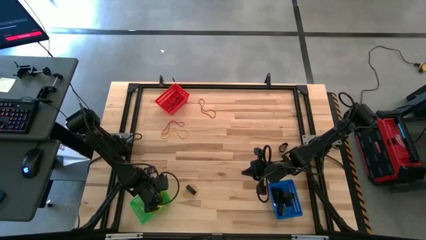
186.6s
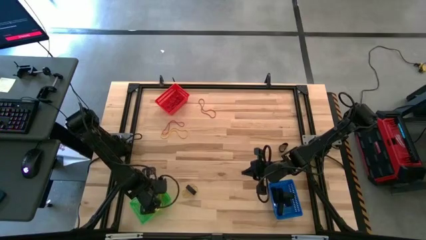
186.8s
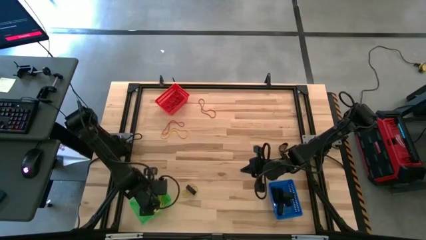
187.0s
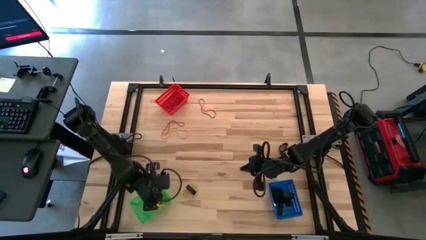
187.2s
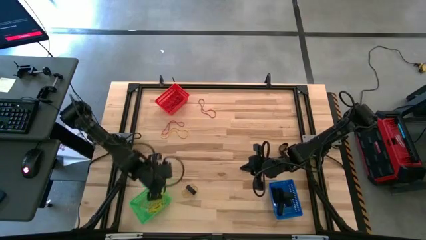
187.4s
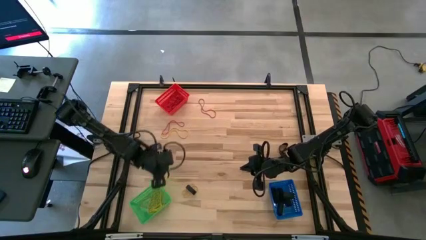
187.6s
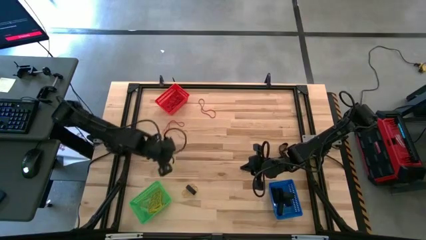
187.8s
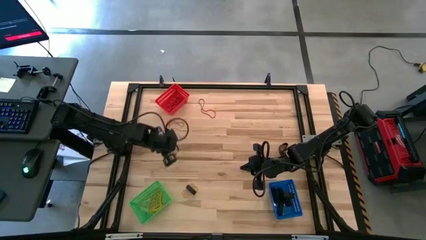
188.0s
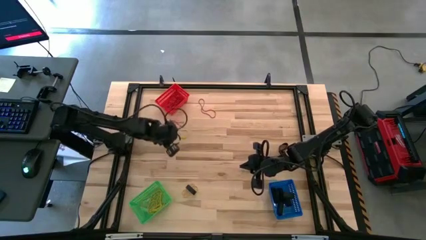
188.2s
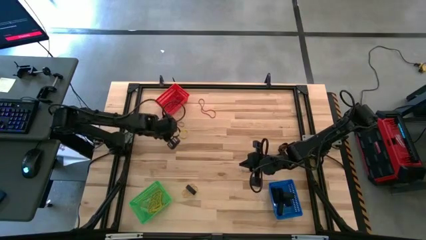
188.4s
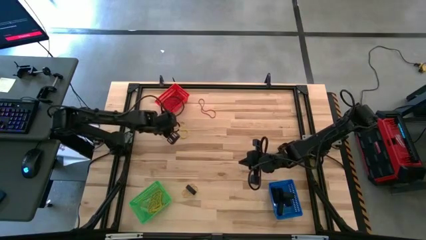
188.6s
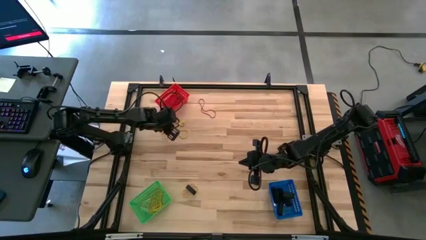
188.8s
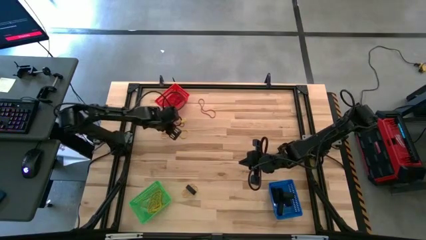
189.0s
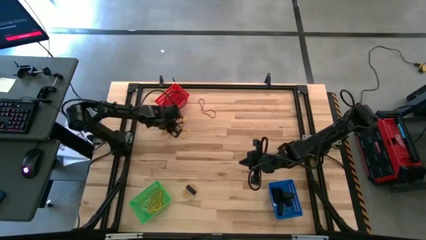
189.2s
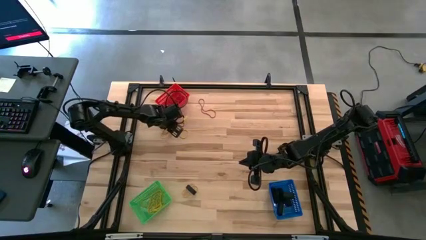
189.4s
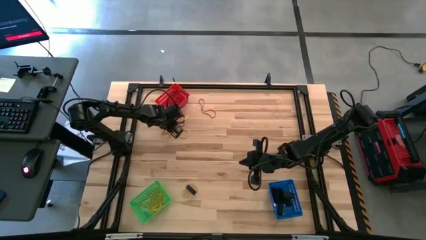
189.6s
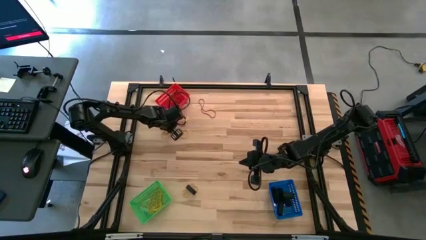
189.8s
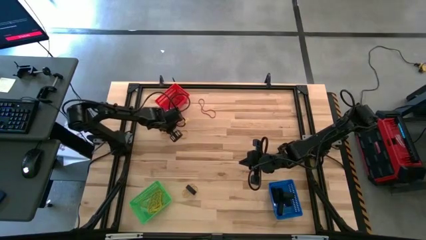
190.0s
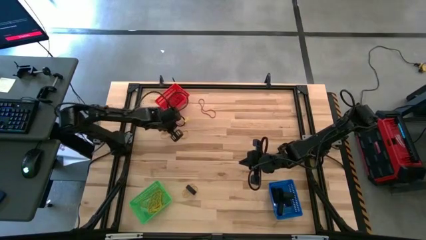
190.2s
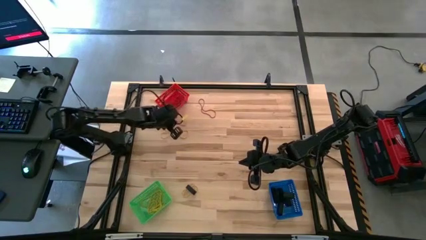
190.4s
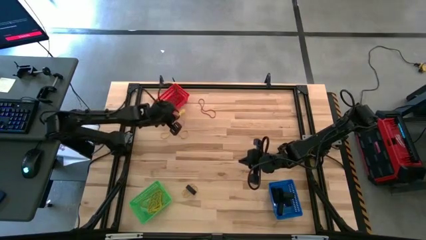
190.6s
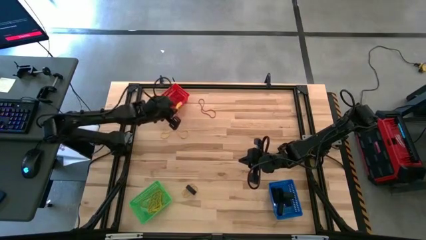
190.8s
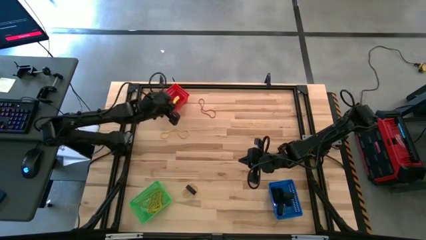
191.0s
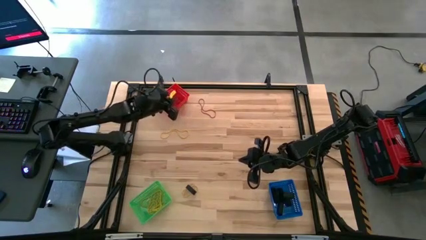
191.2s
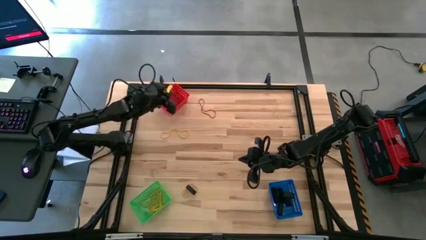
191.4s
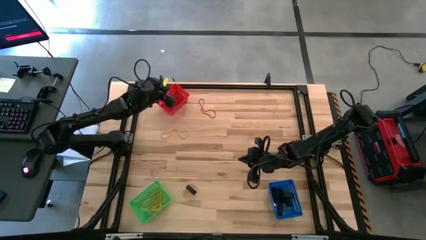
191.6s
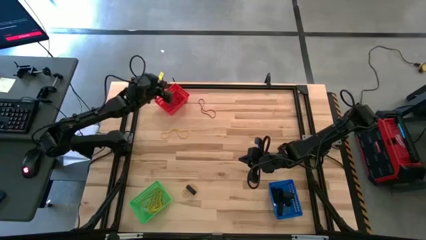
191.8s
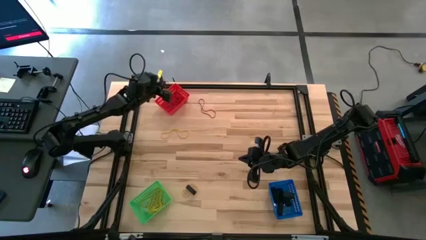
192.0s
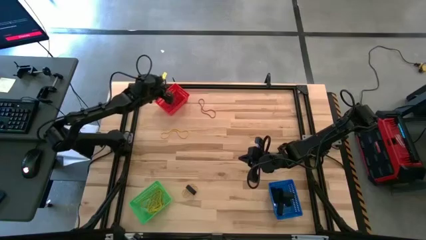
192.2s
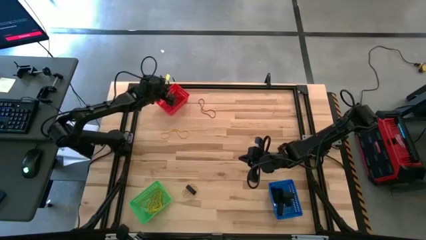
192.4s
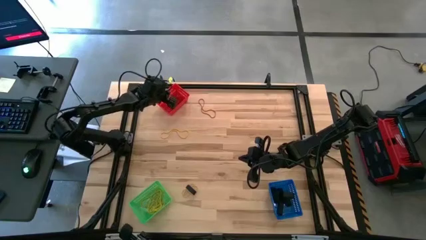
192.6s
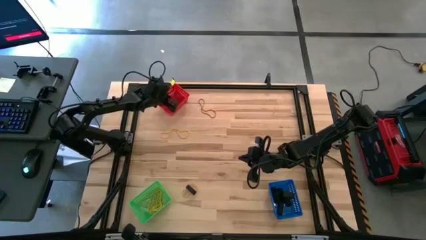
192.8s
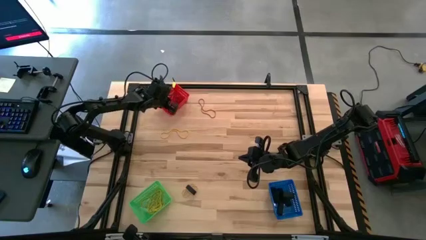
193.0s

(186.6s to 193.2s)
Task: Sort rubber bands into baskets
Put the red rubber band into the red basket

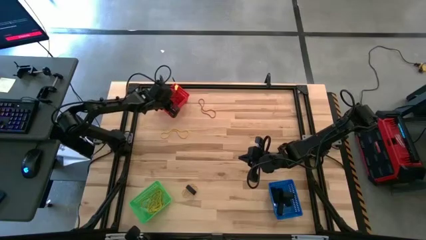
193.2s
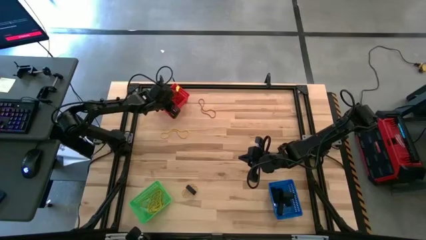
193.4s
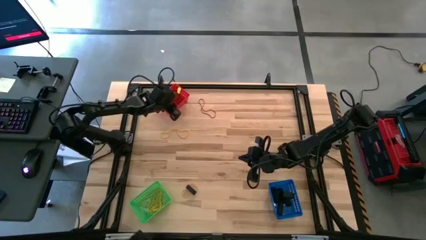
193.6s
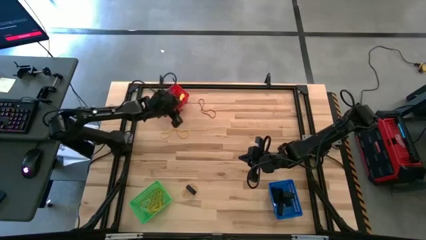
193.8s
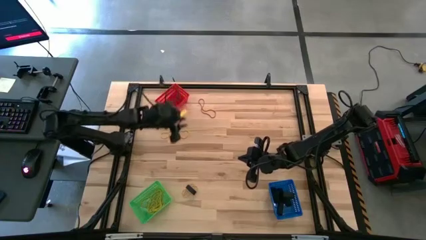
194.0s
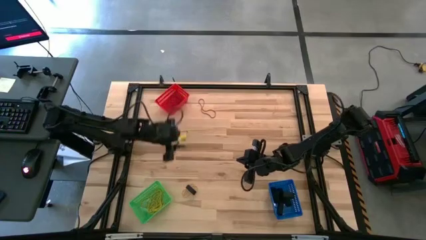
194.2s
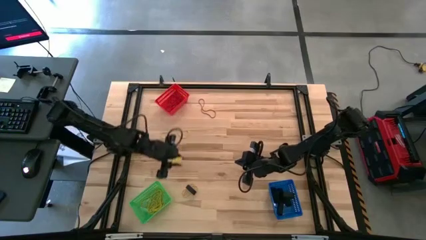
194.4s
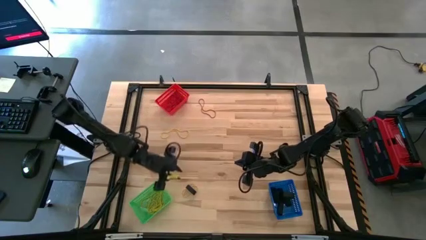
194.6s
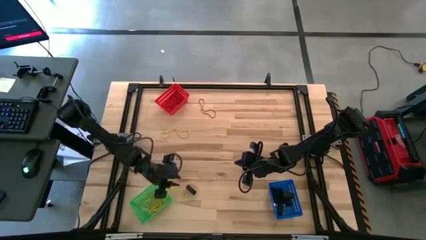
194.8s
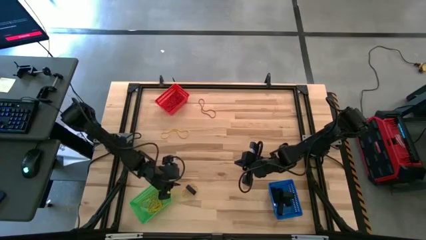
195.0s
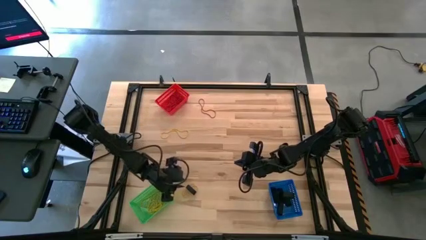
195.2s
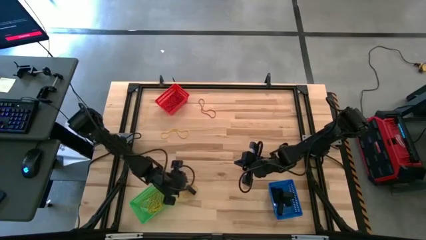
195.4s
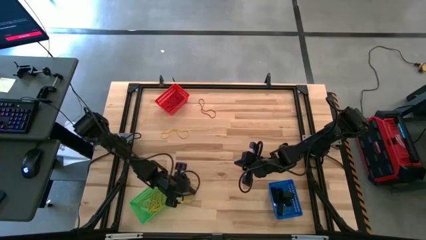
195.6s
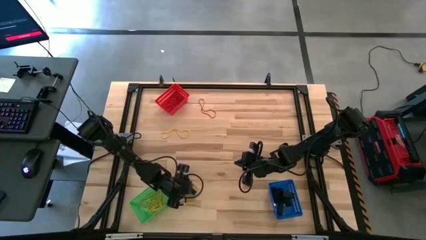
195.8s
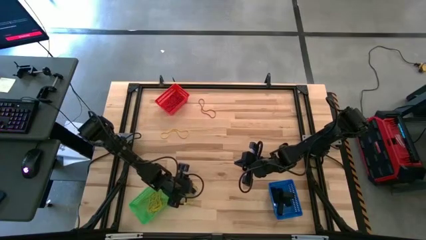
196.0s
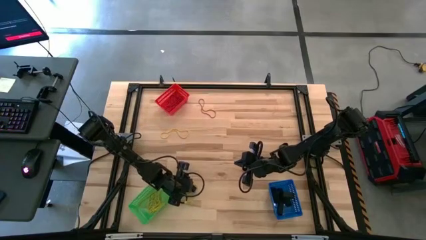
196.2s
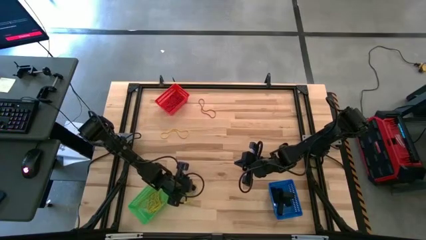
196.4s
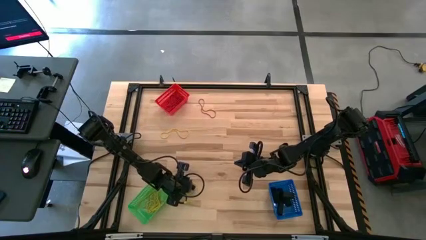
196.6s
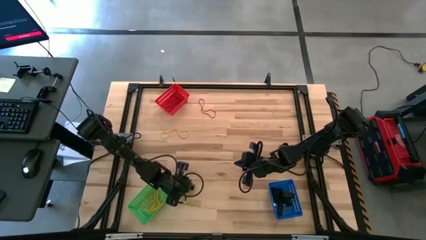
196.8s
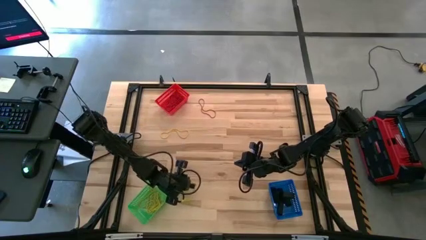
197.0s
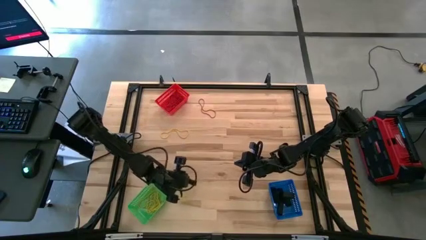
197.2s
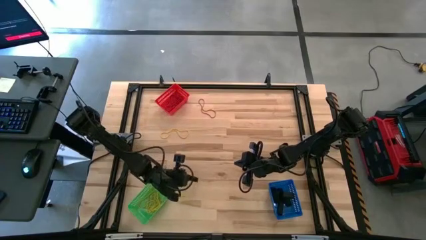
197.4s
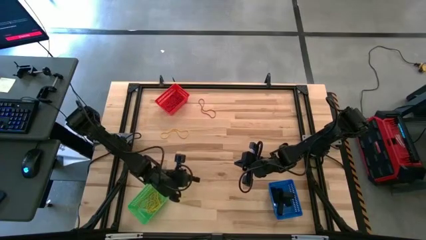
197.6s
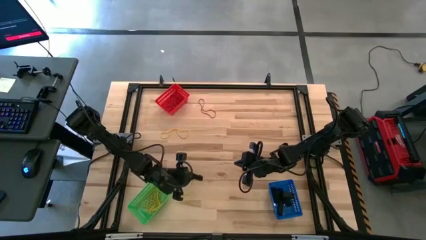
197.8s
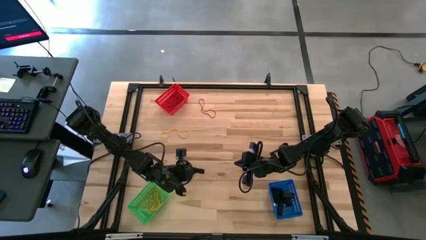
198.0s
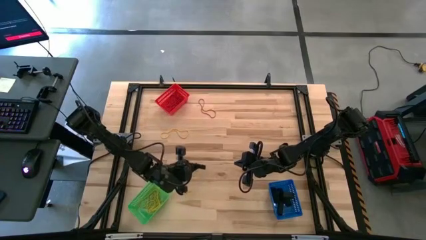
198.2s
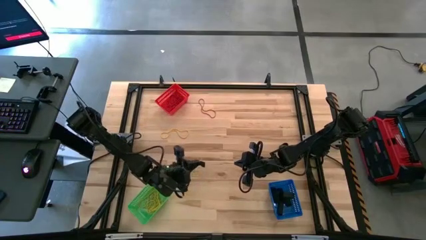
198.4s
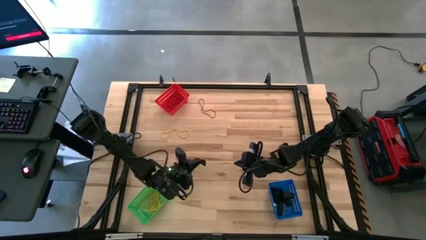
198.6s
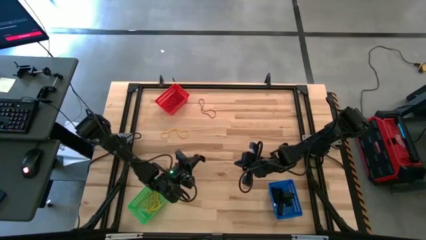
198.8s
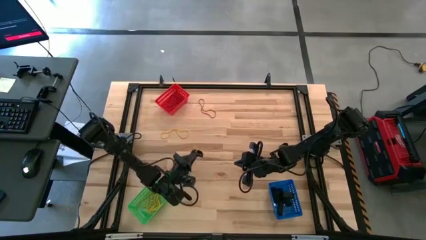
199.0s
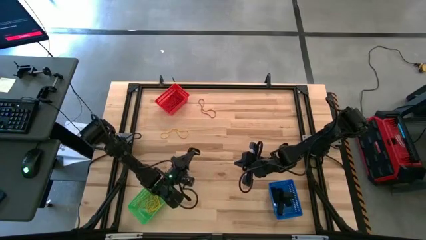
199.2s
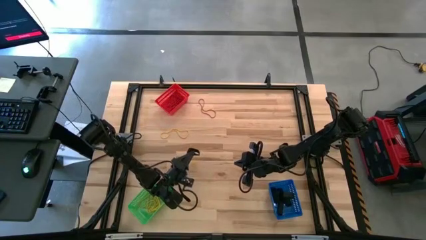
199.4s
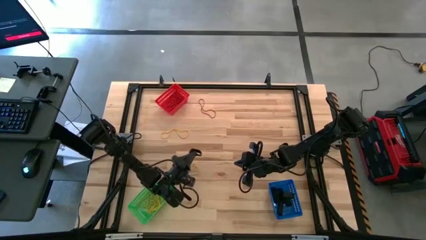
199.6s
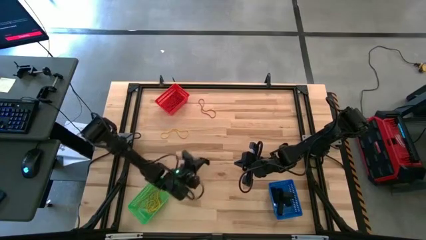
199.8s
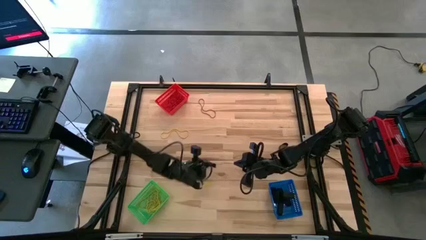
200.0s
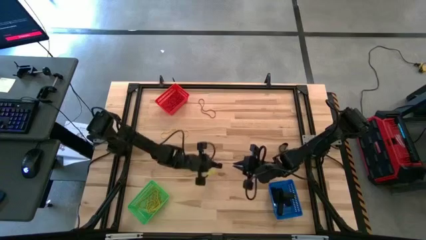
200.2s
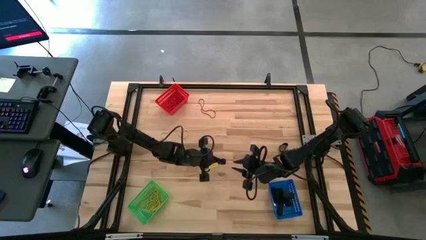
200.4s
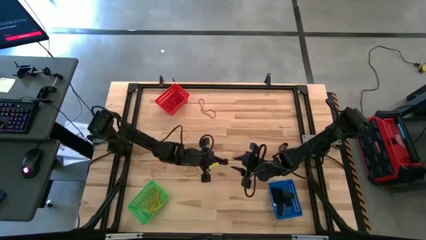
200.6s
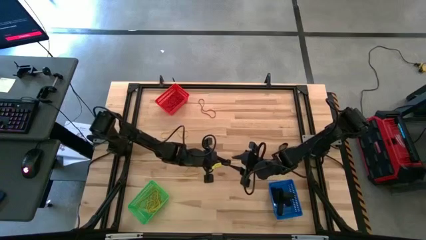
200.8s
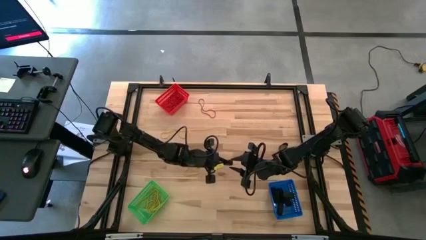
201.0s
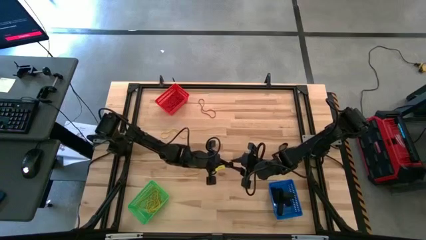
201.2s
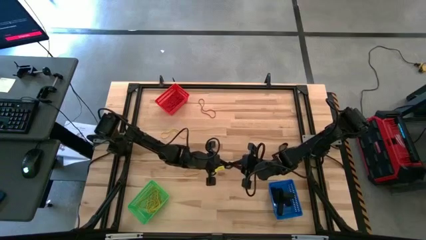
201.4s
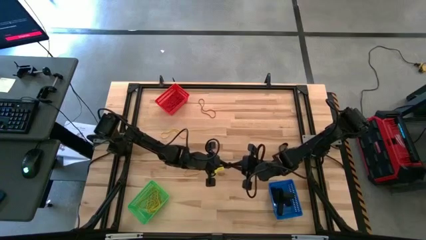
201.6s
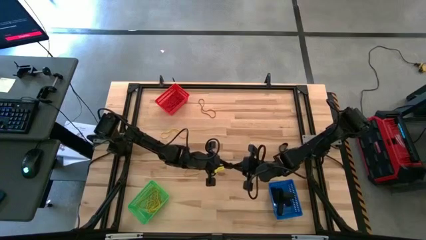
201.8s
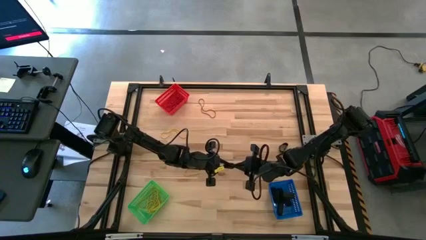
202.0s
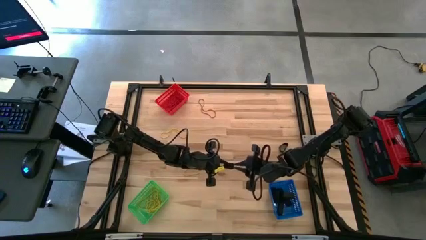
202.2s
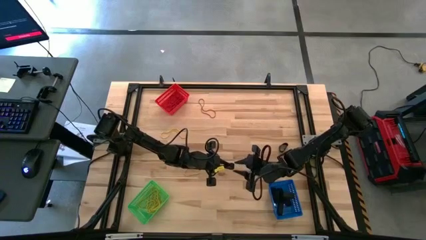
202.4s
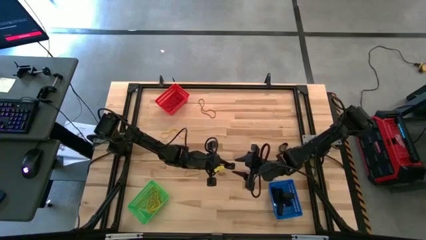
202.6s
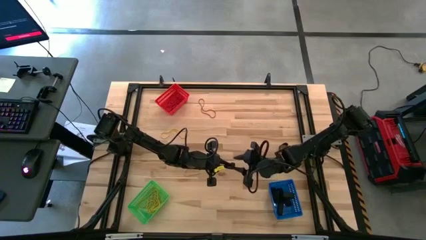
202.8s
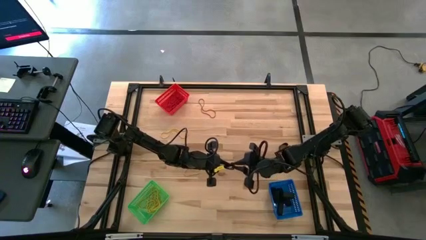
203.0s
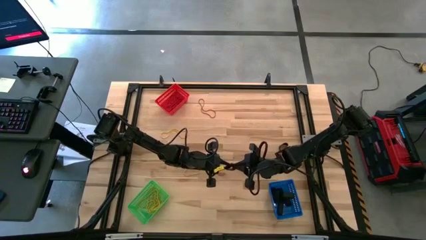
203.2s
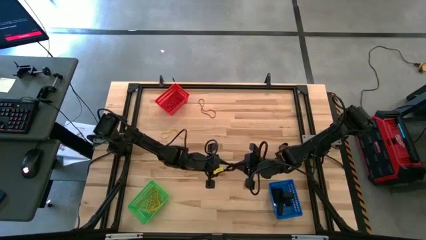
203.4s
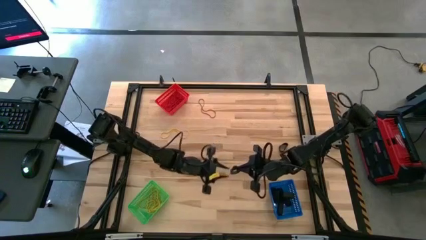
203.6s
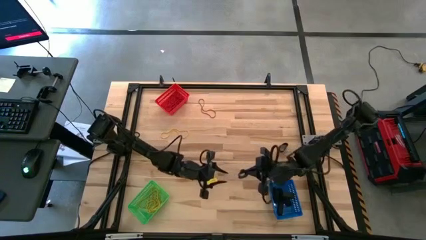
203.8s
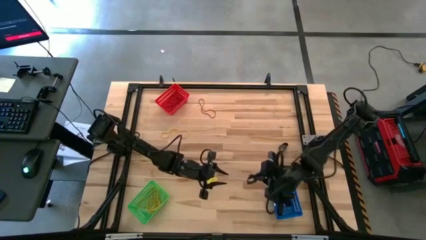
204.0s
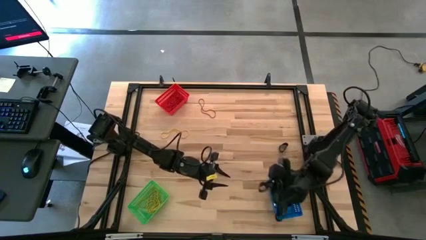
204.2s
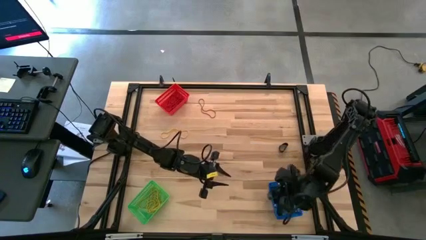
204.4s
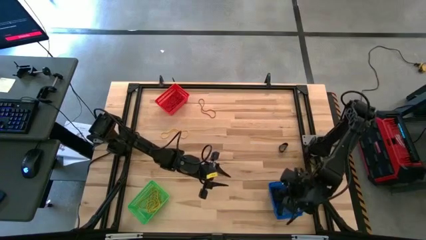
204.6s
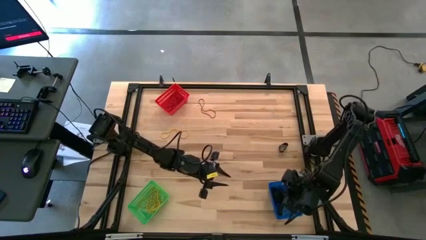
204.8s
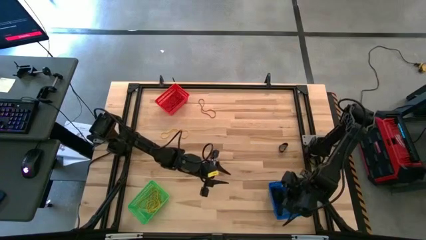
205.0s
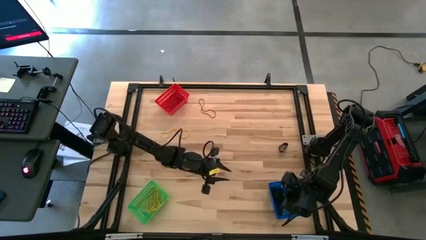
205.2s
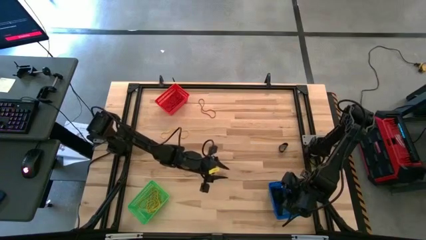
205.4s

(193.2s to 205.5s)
Put the black rubber band into the blue basket
